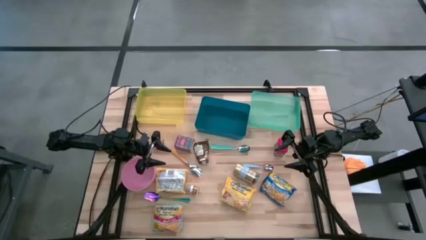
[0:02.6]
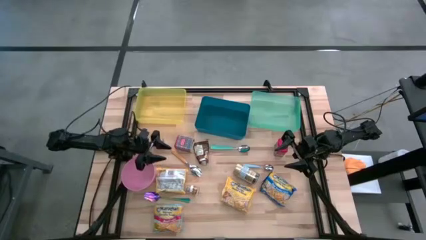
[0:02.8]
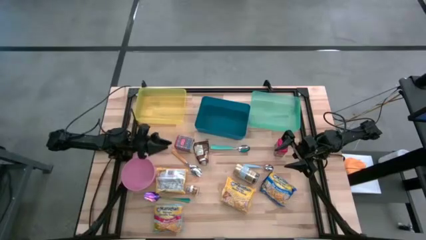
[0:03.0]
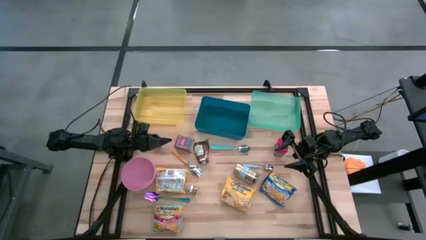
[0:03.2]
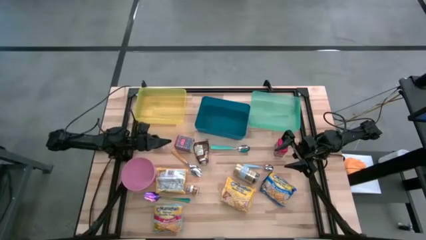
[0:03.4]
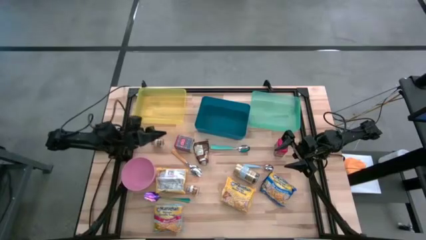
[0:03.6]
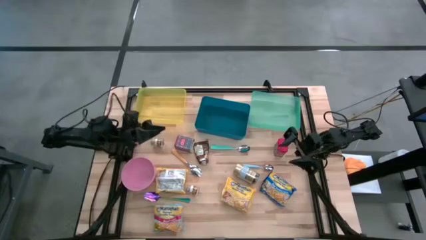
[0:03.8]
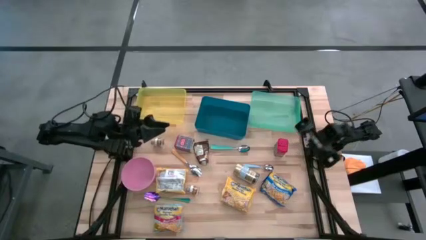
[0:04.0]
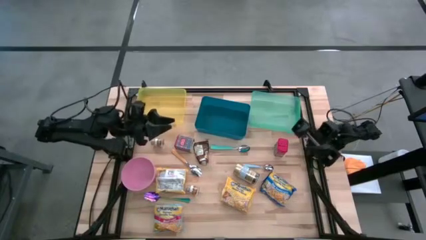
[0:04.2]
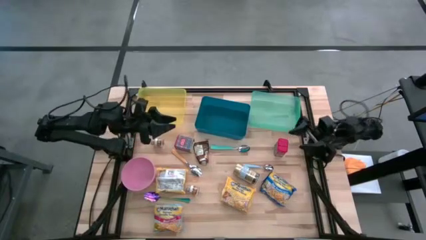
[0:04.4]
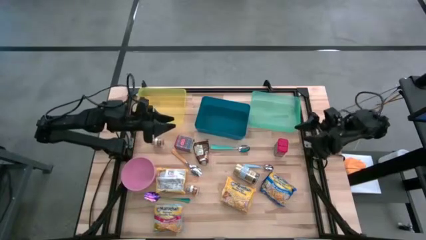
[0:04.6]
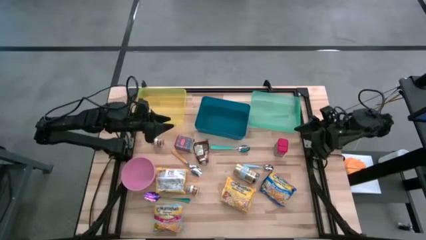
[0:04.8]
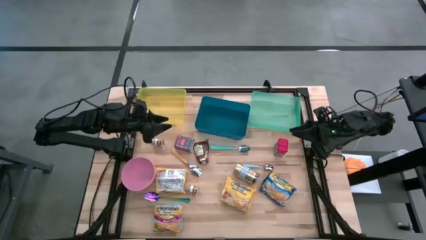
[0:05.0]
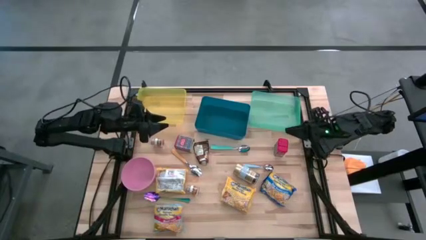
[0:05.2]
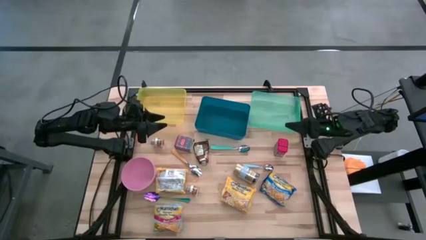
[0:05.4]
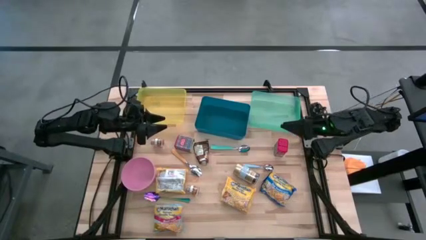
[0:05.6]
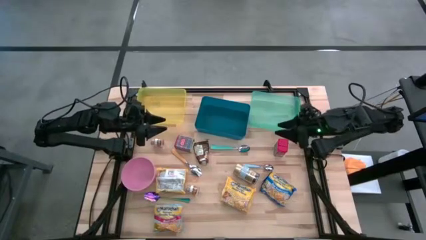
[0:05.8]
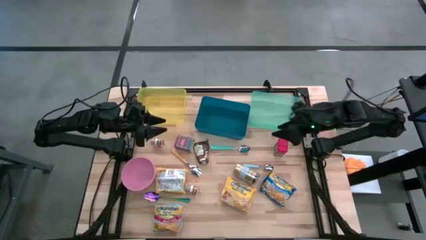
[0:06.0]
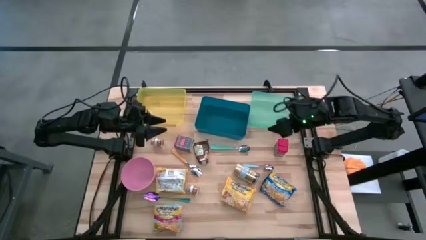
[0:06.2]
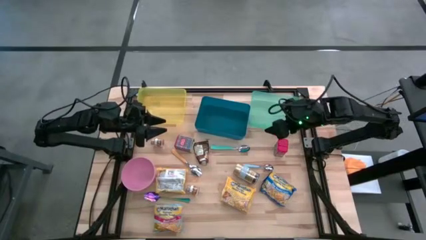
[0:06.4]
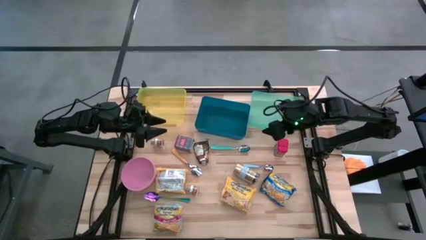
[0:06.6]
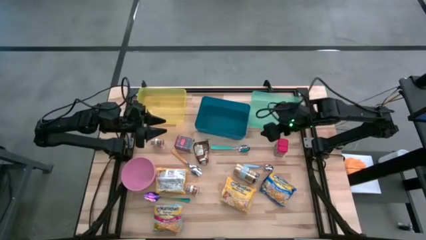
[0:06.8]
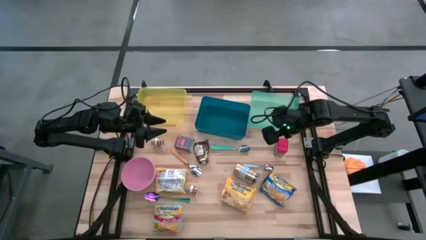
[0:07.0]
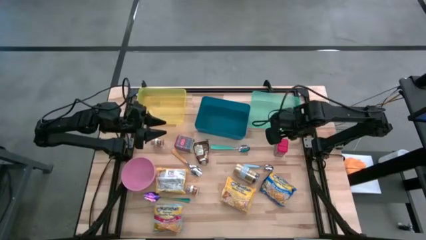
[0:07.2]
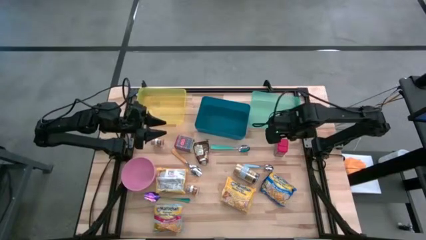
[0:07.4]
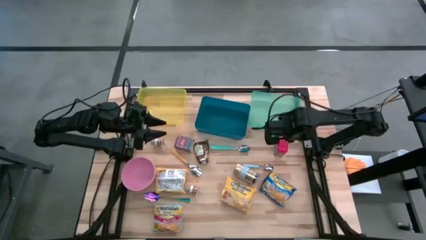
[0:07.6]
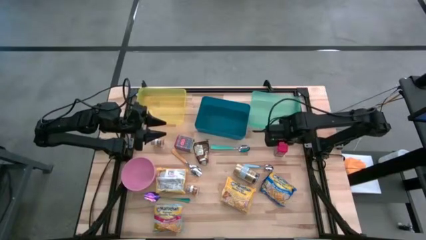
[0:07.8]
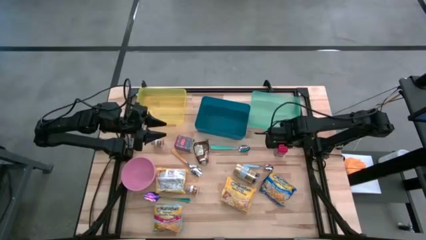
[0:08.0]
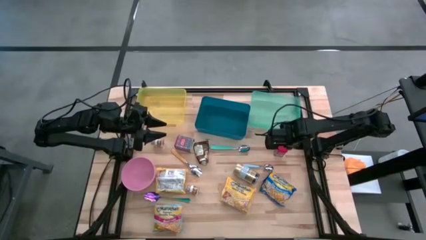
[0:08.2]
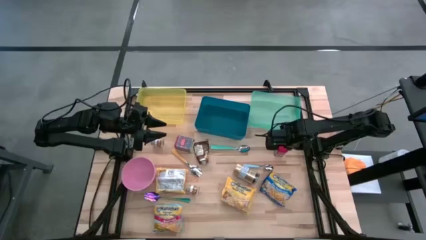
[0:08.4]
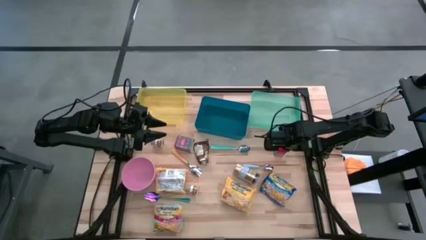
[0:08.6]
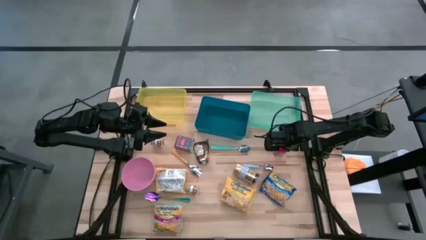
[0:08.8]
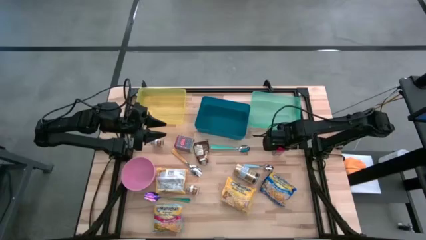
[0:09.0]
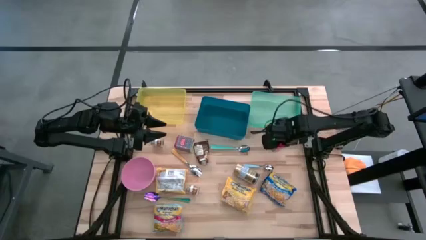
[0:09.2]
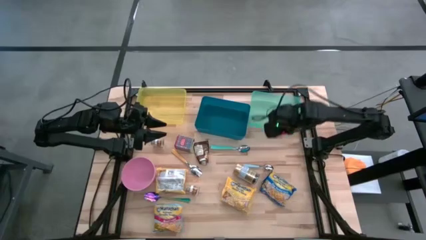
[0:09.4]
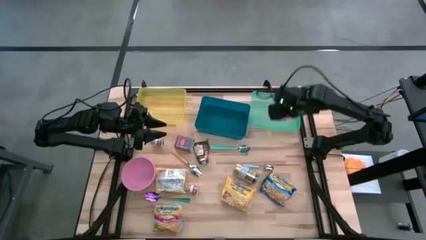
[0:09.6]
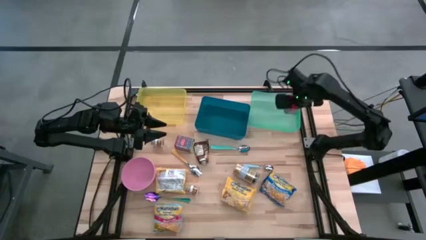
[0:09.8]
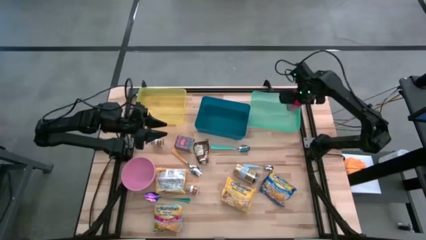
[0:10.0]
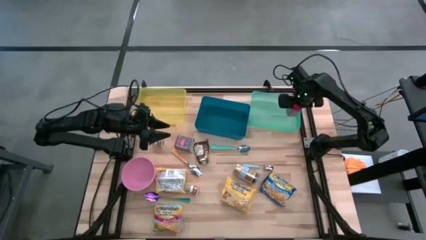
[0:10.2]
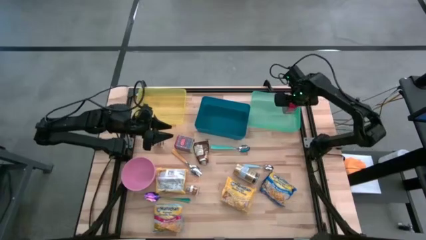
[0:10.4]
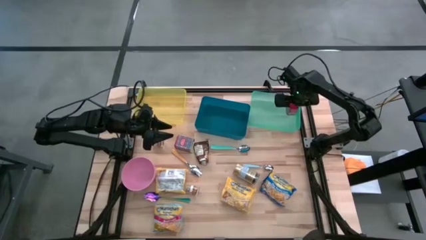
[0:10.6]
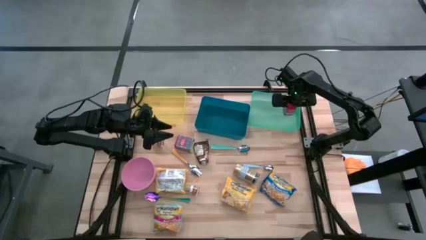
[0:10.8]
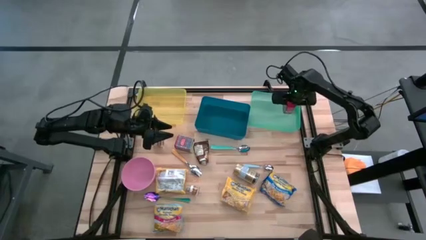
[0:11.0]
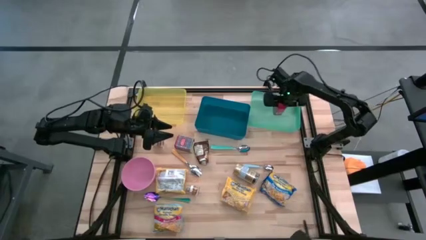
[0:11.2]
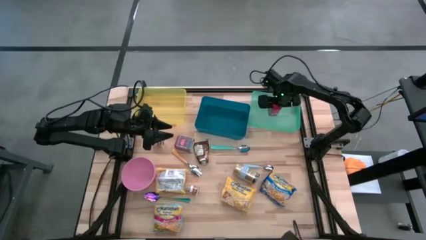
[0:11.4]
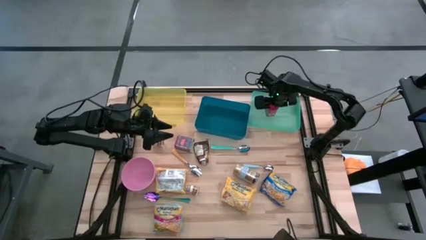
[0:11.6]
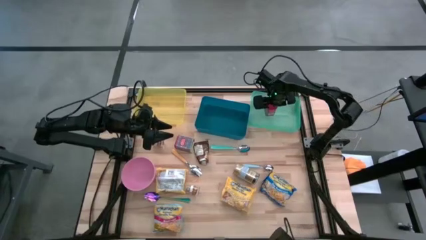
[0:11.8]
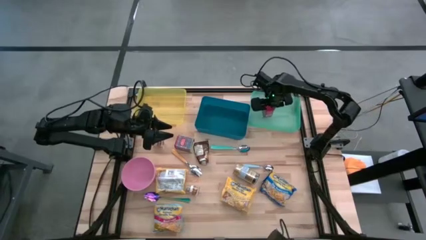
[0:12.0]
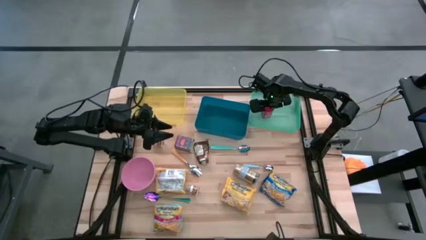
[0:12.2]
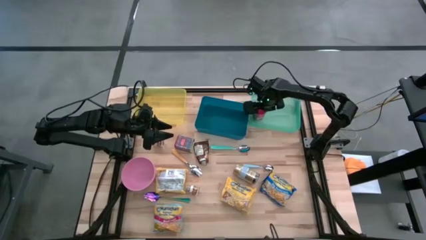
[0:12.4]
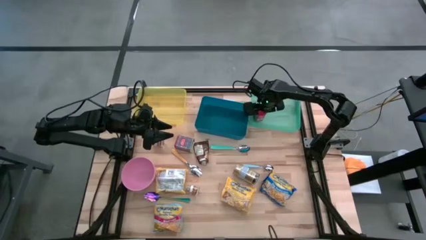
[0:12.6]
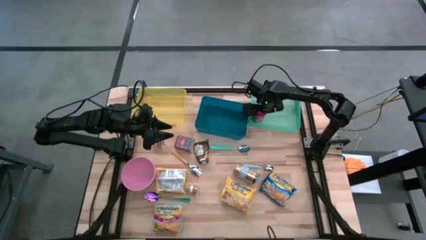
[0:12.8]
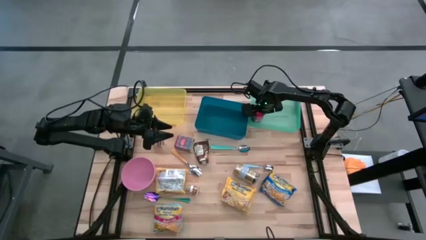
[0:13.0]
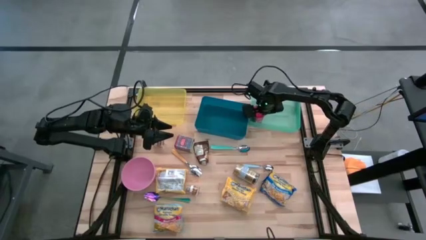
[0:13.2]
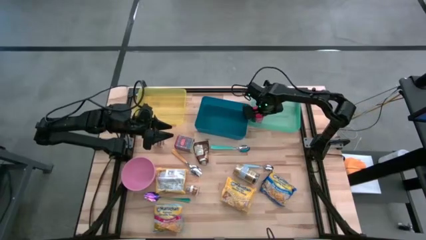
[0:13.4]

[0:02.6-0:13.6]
Put the right red seasoning can into the light green bin

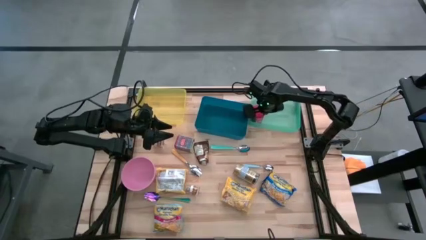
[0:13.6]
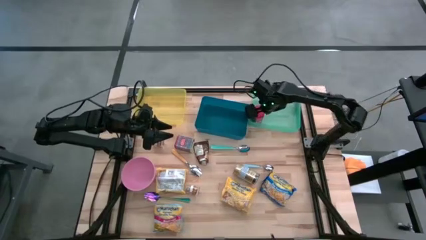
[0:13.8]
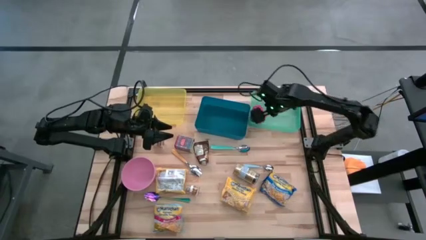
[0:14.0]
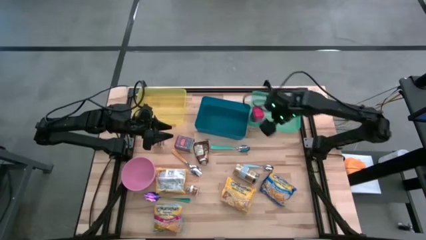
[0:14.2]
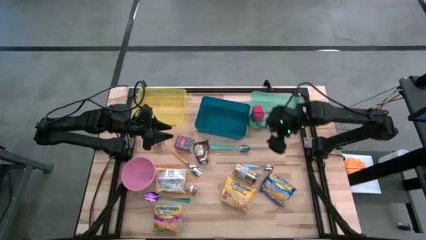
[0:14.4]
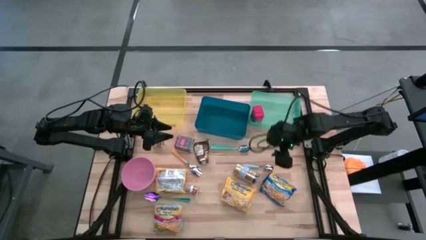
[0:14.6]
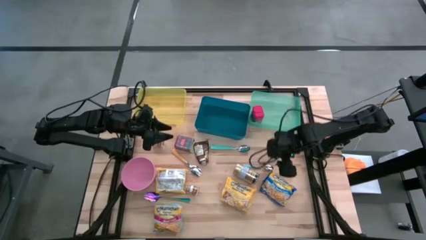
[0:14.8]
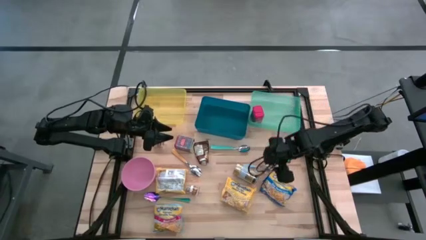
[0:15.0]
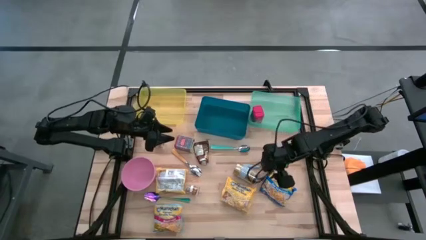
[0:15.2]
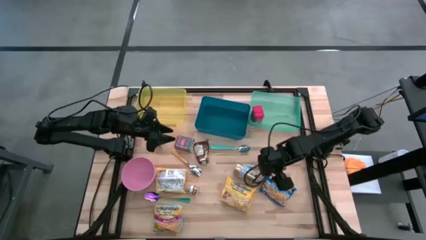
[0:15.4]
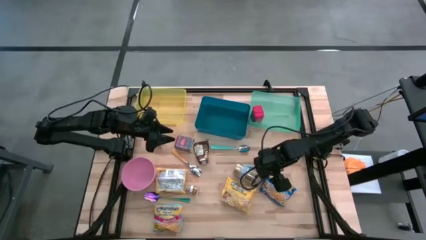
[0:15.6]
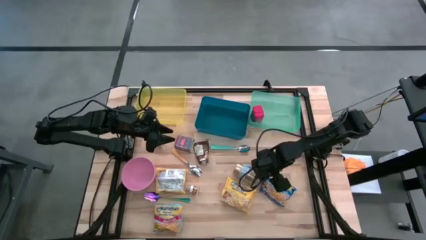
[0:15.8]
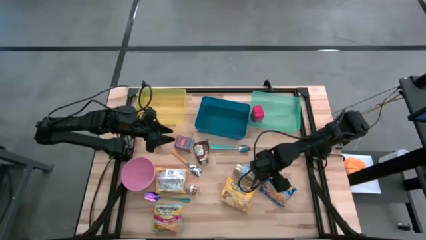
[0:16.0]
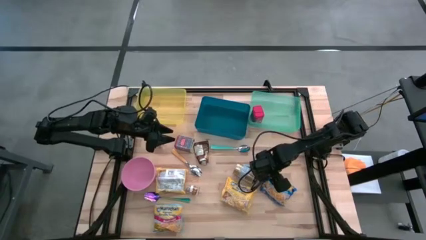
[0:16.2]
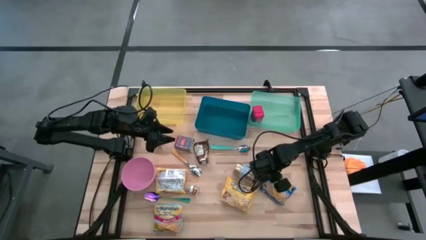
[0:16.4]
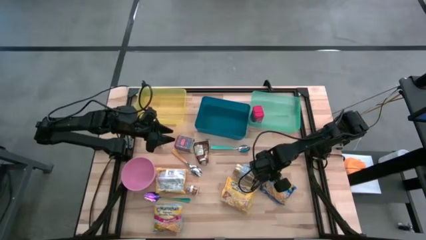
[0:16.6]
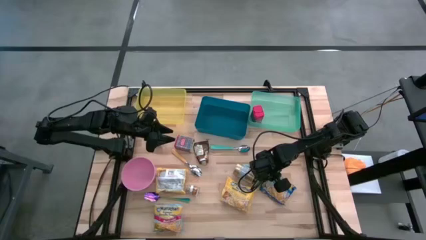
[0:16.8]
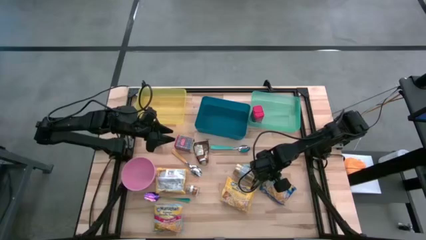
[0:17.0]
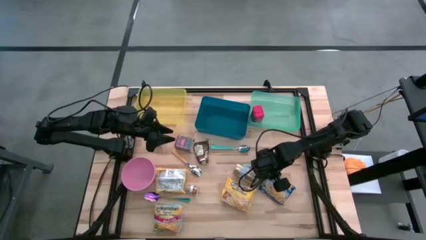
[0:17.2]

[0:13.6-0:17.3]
Put the blue noodle pack into the blue bin
